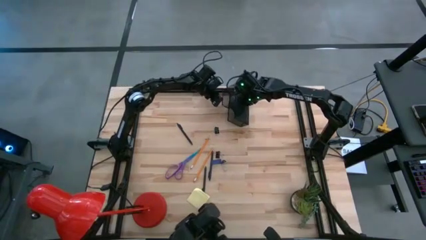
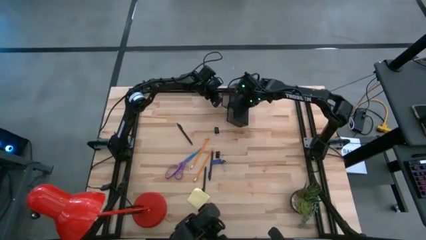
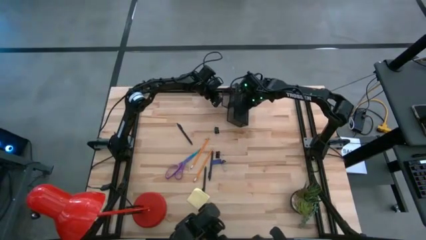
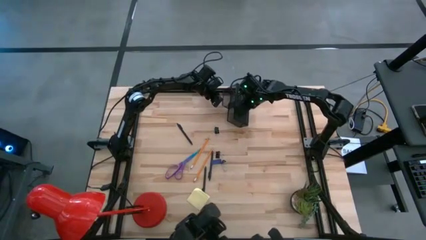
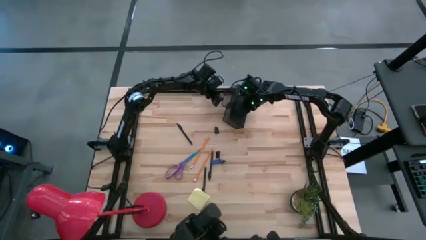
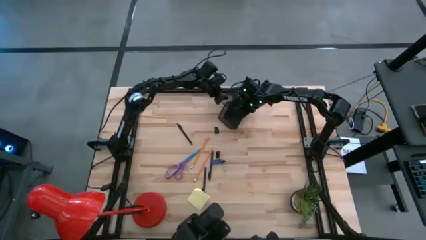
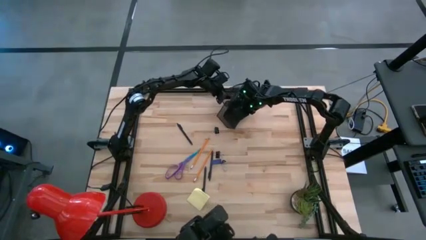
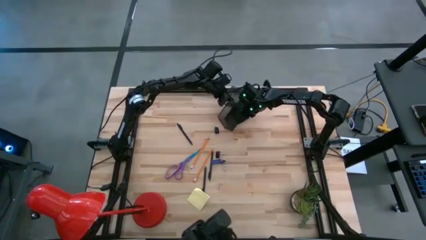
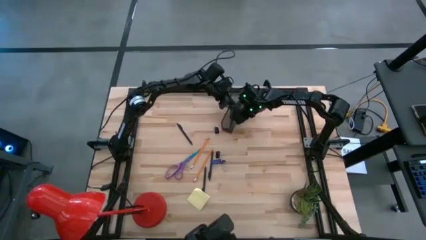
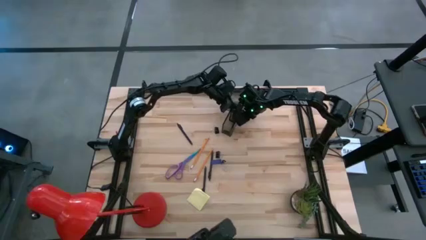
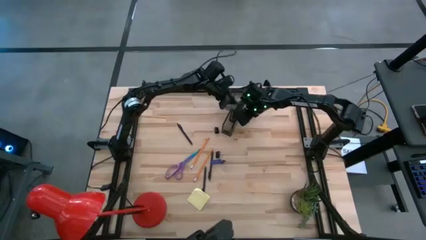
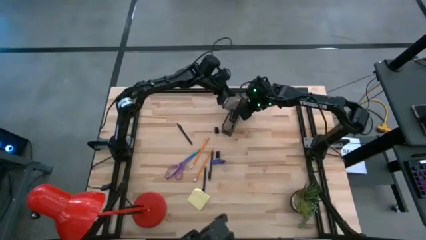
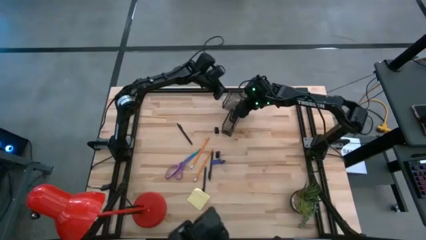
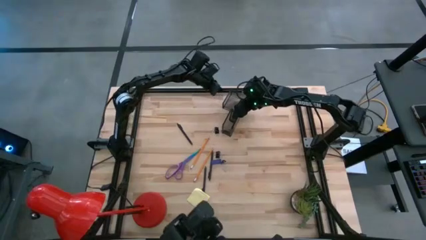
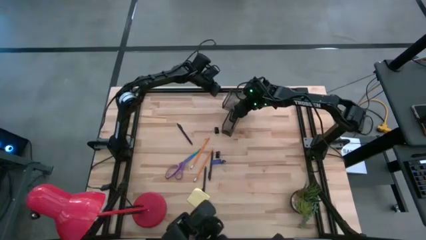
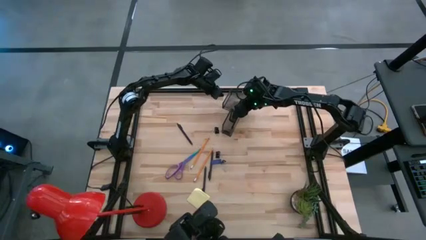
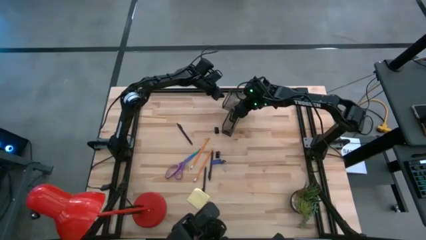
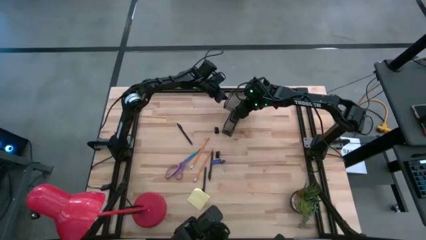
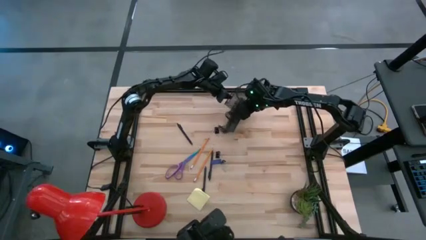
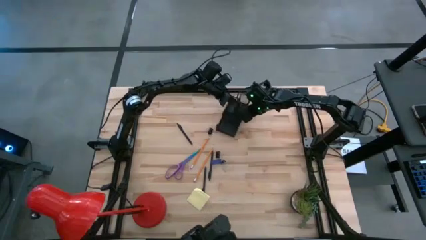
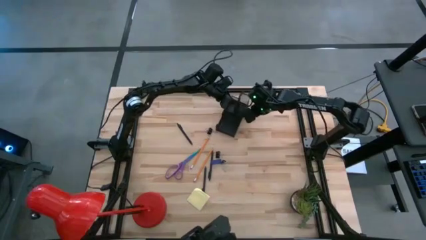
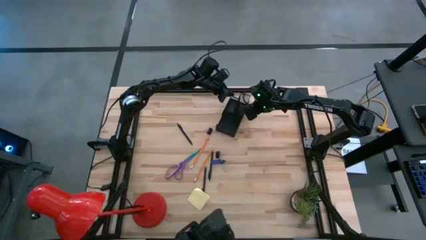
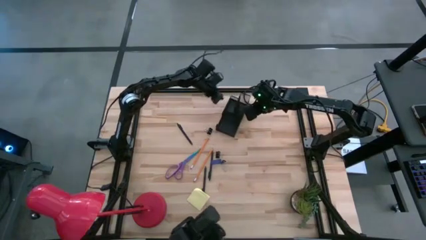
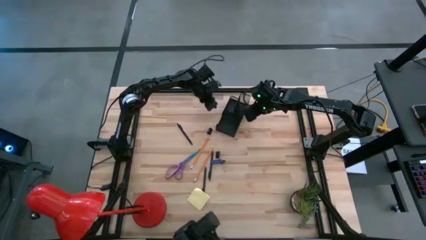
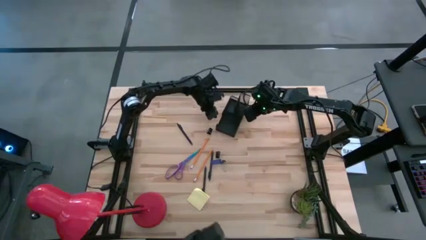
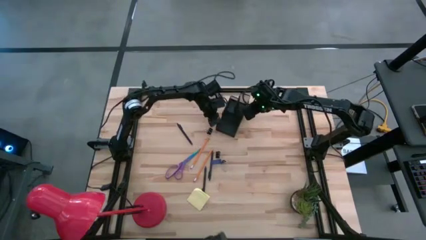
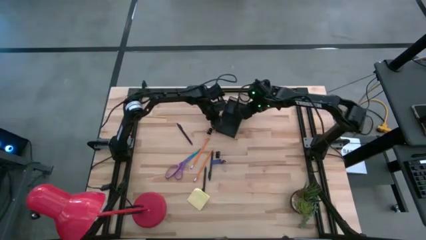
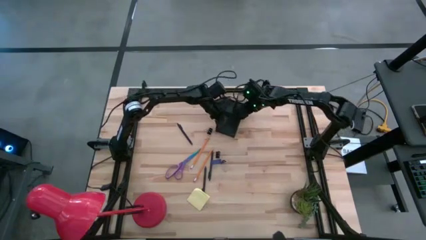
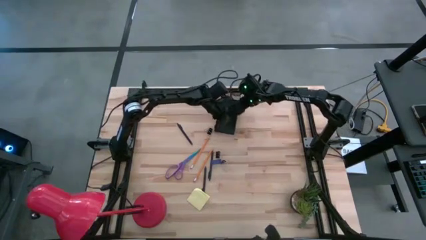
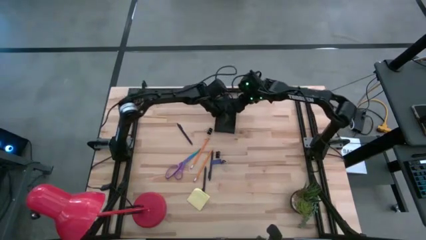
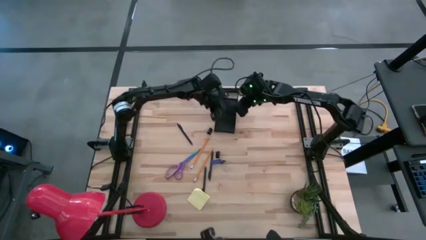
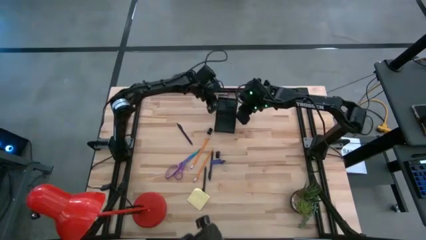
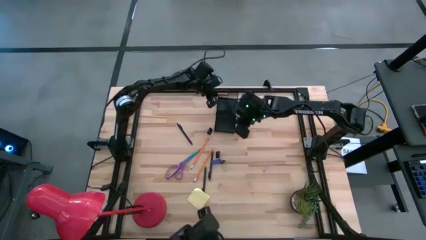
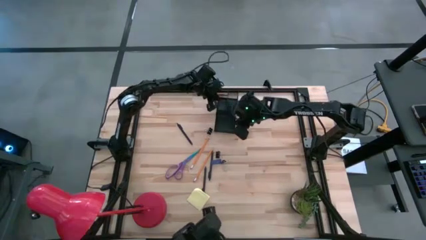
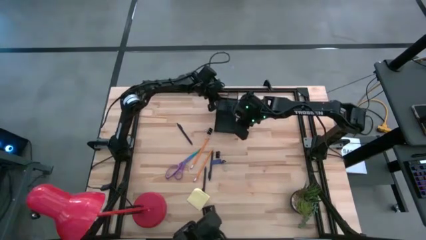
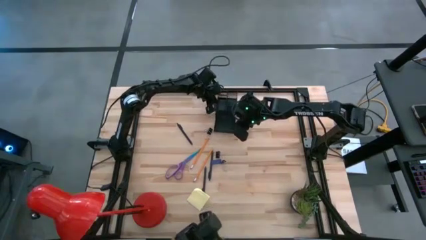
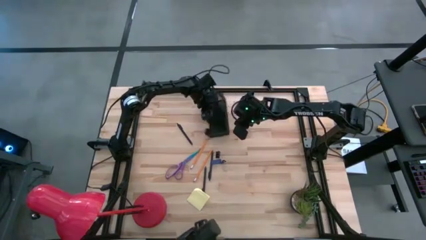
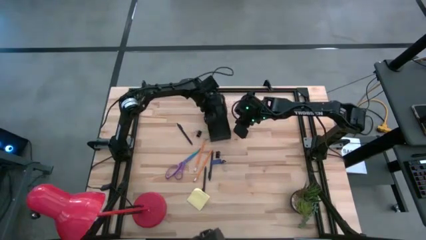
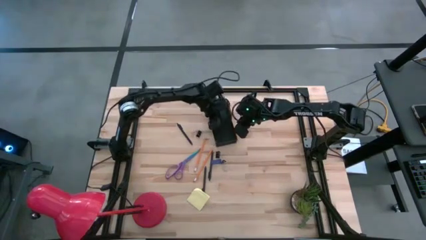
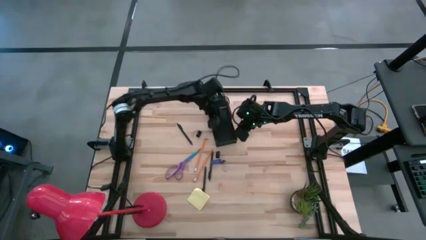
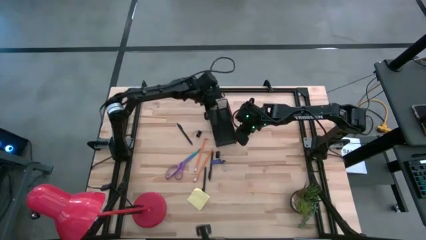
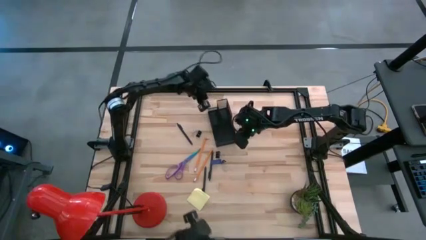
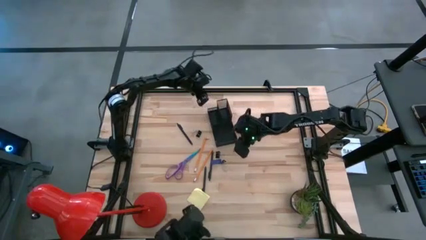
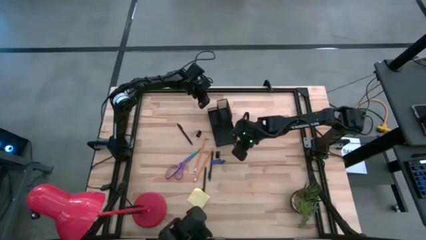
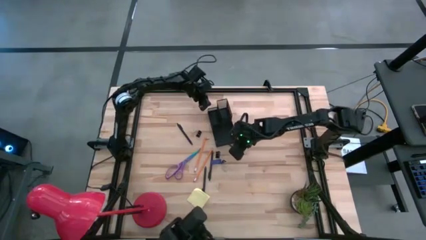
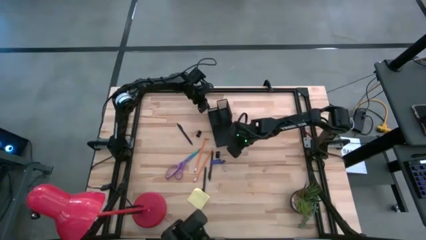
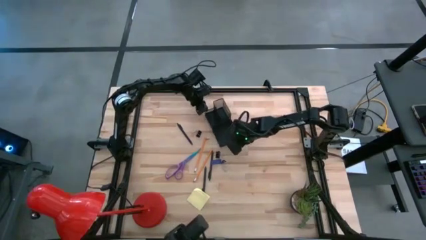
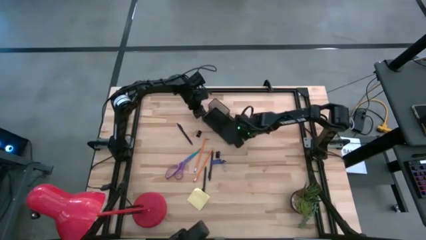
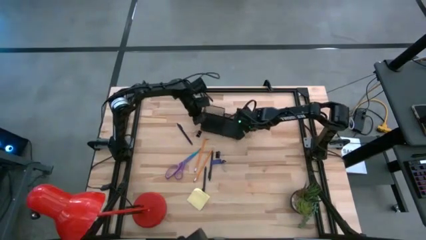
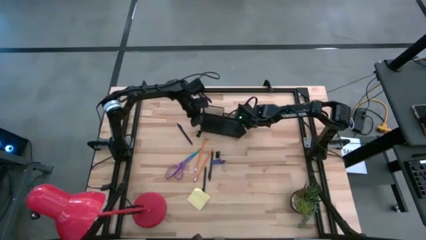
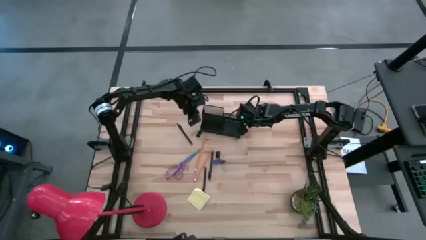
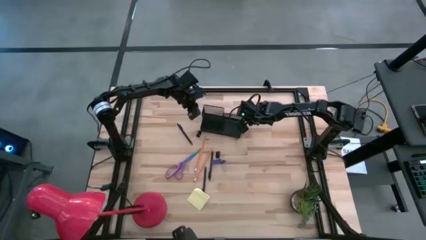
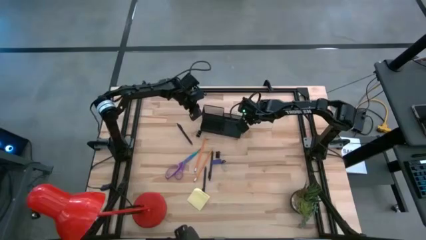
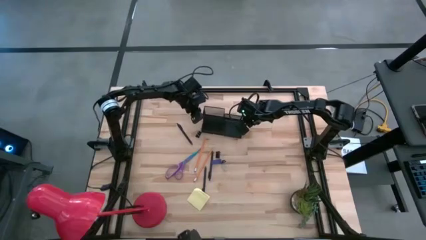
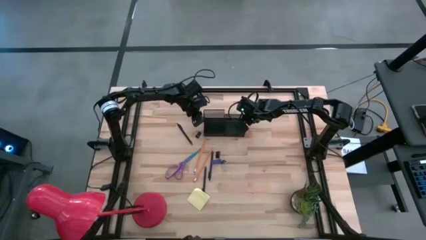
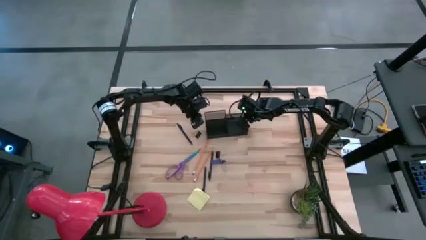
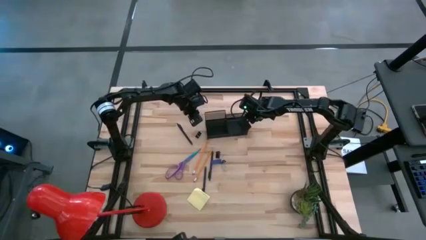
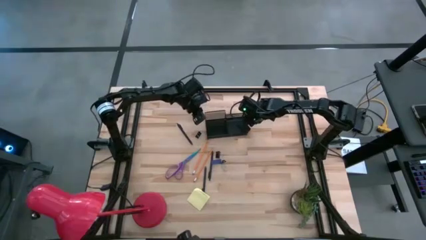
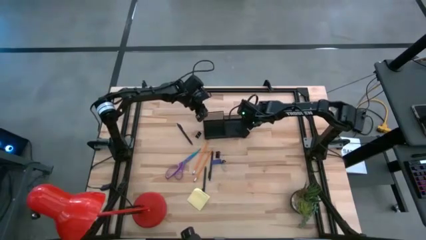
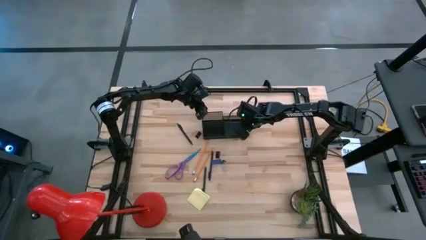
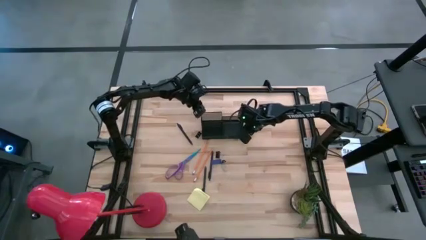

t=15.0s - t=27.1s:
Task: Pick and place office supplies into organizer
Prepare the black desk organizer on the table

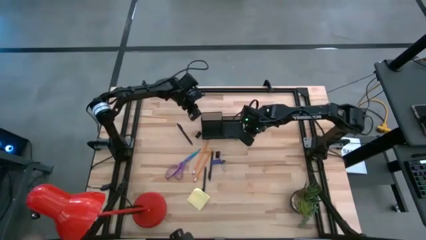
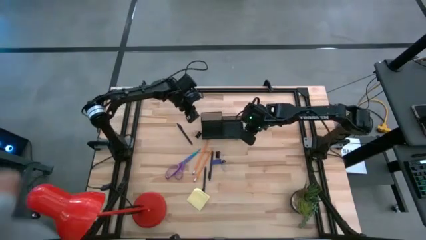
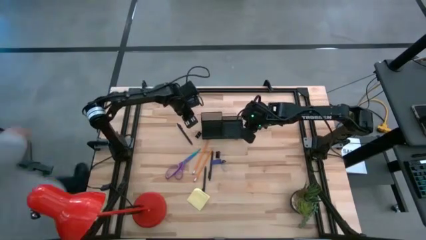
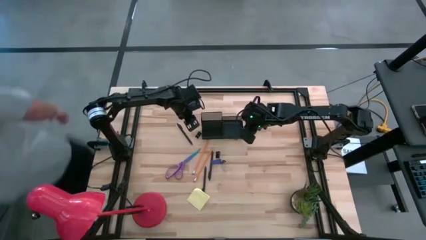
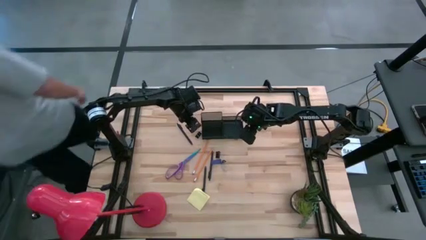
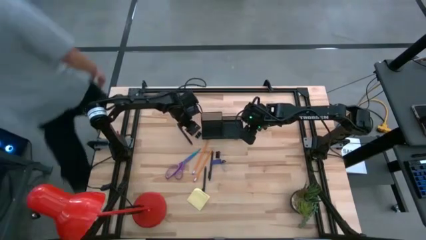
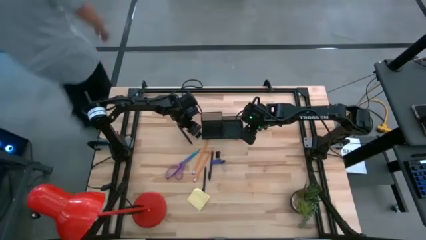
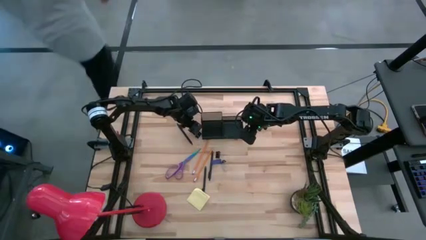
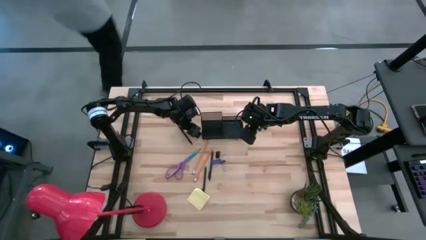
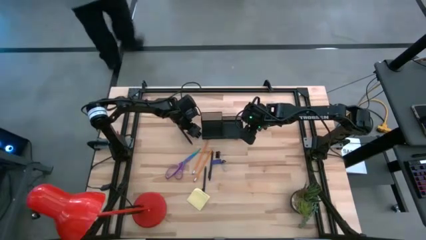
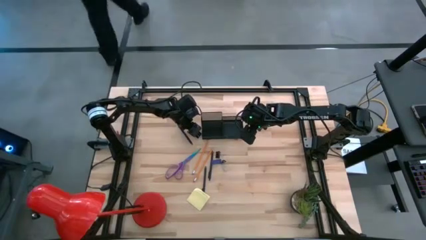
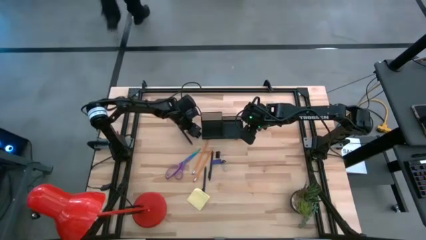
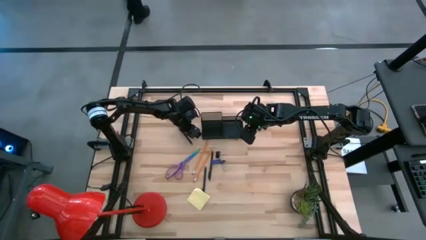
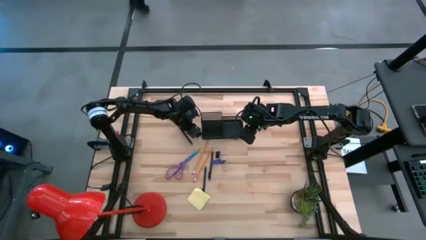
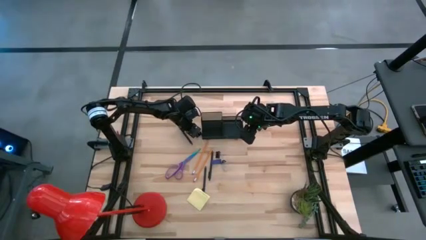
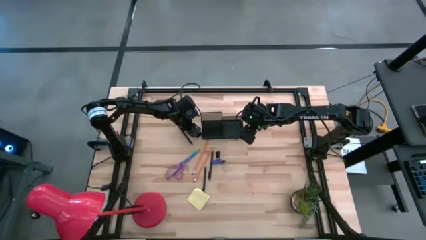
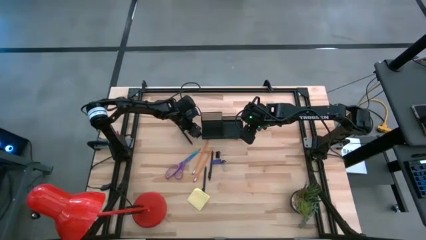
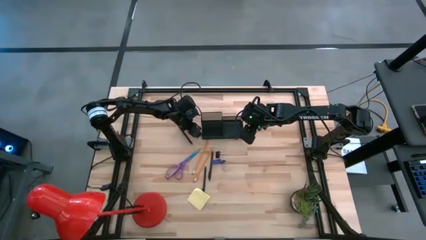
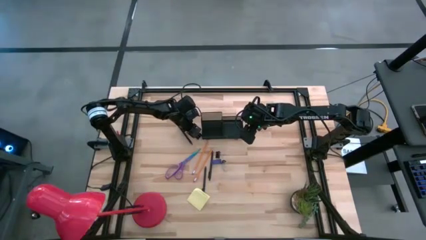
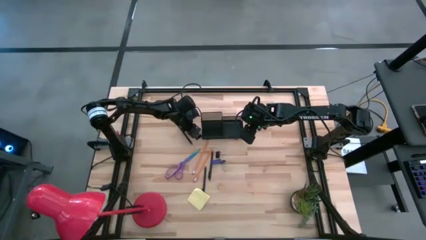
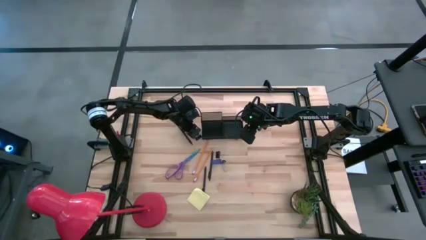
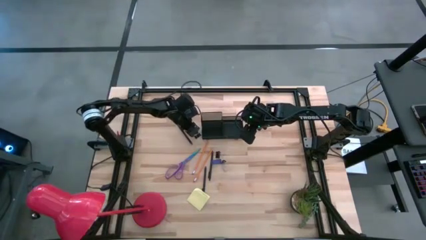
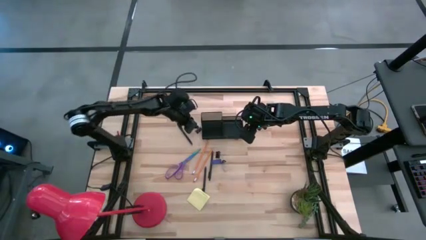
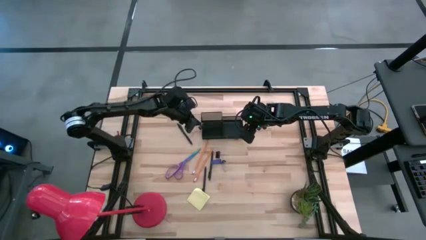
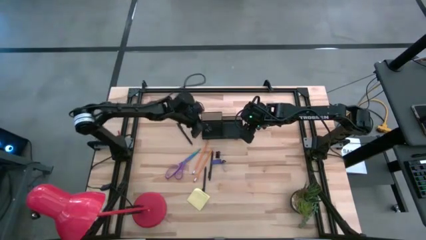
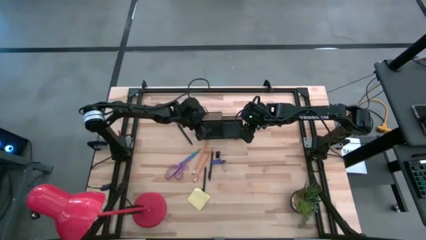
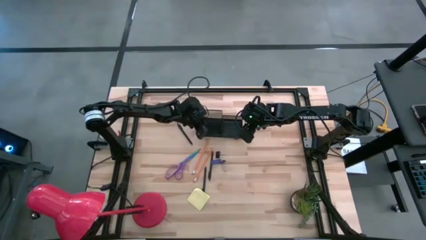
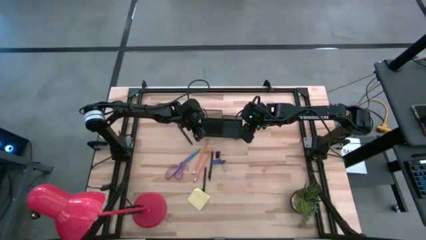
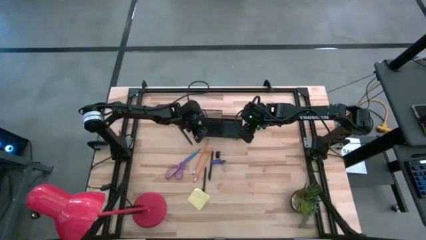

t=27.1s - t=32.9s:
Put the top black binder clip into the black desk organizer

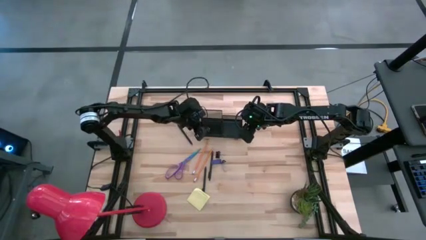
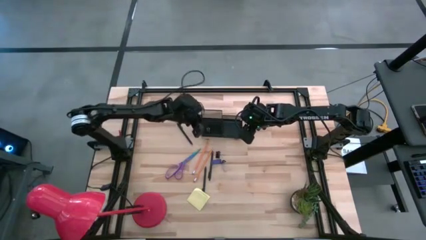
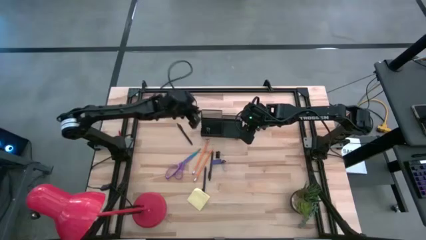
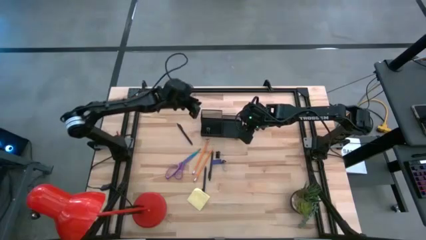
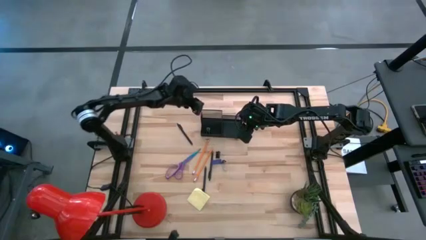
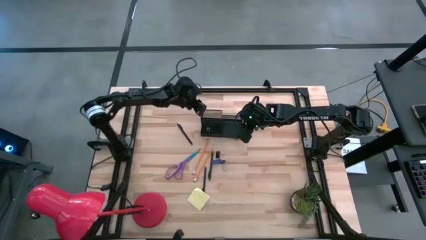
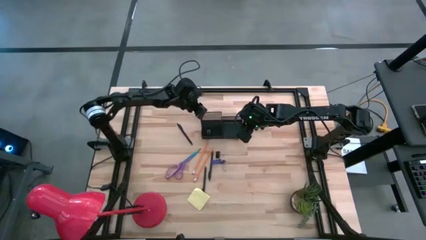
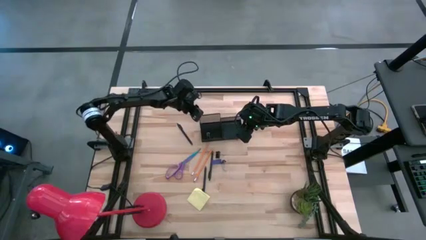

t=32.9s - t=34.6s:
Adjust the black desk organizer on the table
